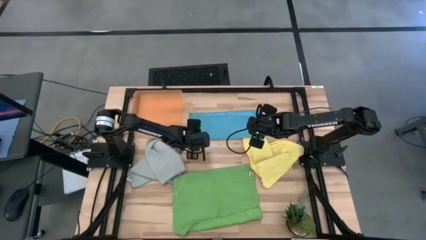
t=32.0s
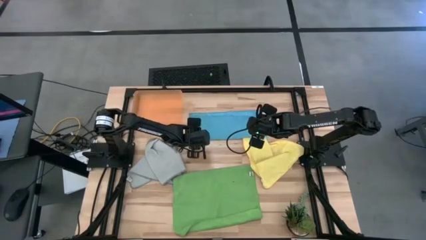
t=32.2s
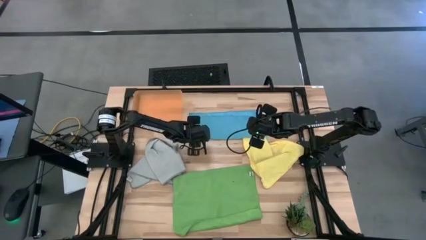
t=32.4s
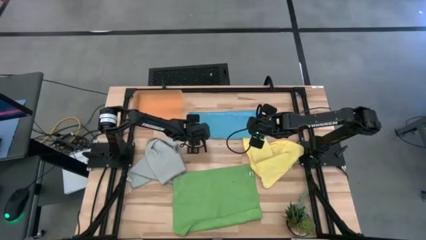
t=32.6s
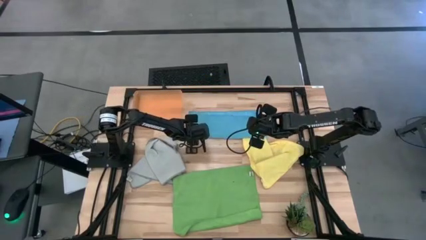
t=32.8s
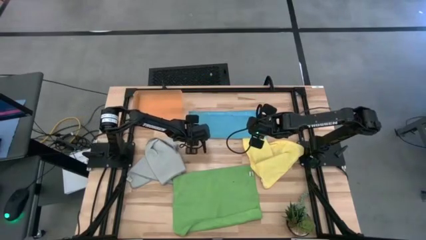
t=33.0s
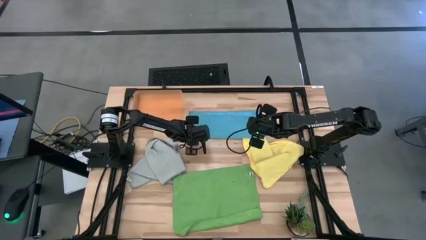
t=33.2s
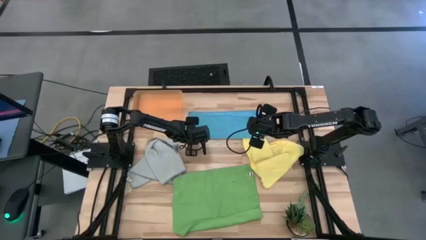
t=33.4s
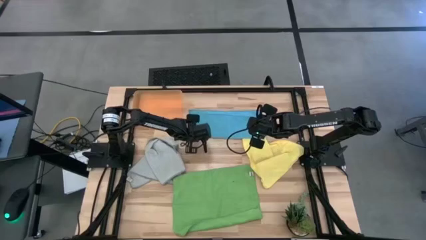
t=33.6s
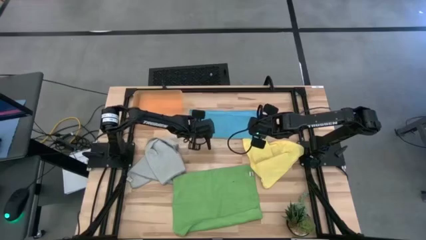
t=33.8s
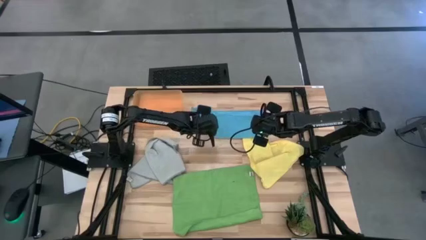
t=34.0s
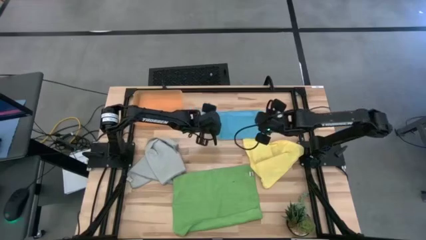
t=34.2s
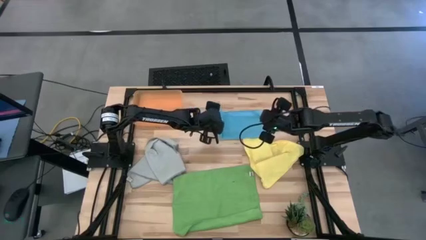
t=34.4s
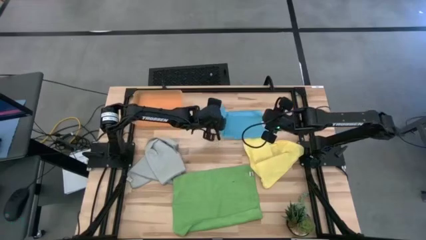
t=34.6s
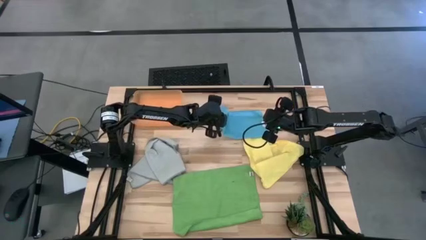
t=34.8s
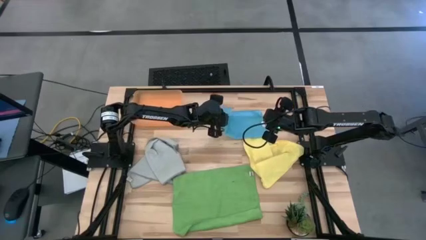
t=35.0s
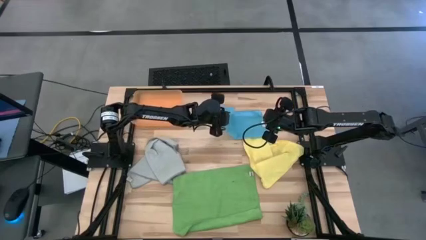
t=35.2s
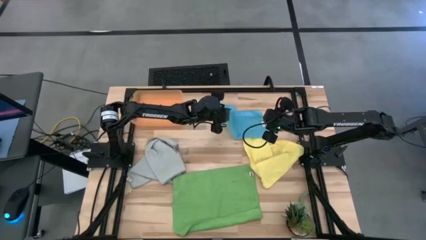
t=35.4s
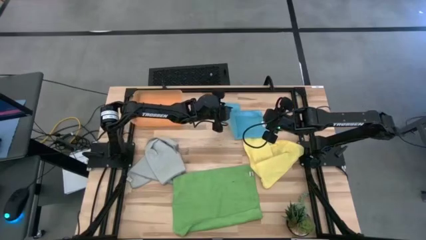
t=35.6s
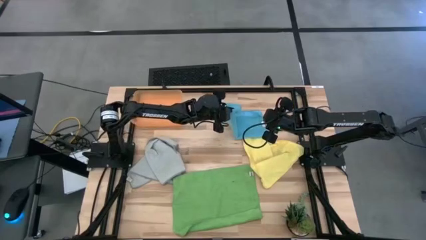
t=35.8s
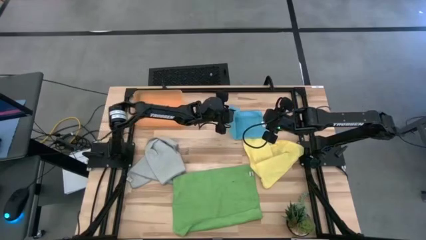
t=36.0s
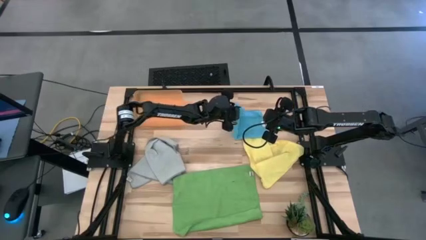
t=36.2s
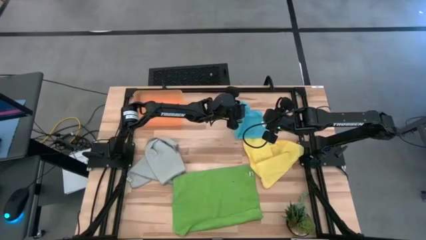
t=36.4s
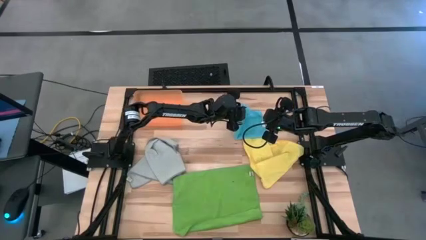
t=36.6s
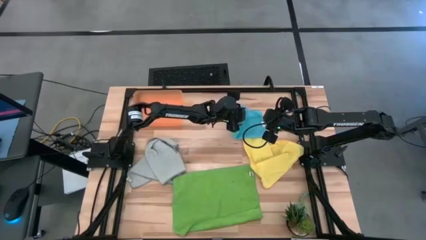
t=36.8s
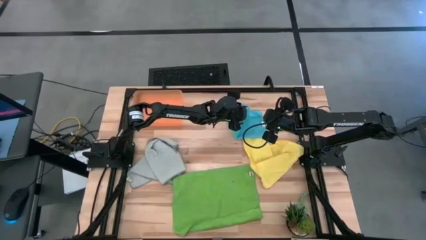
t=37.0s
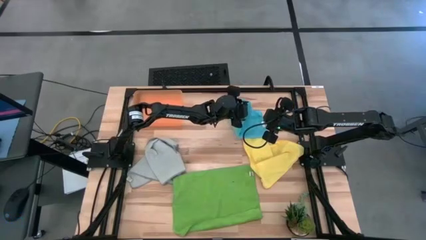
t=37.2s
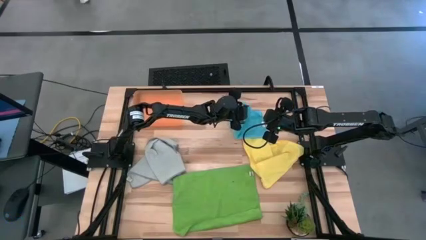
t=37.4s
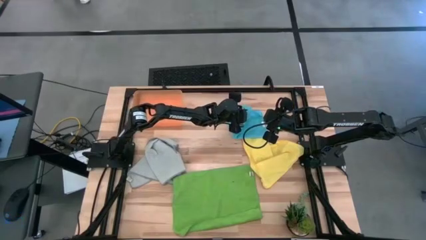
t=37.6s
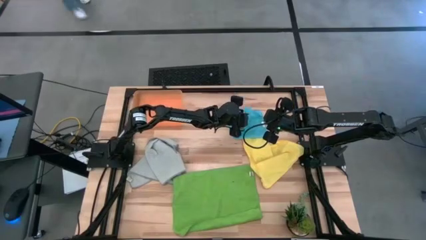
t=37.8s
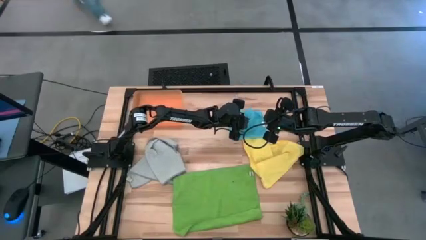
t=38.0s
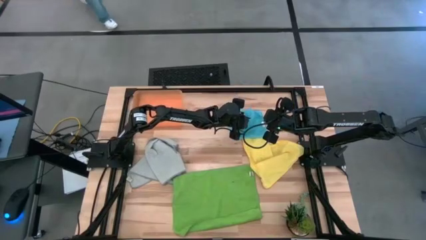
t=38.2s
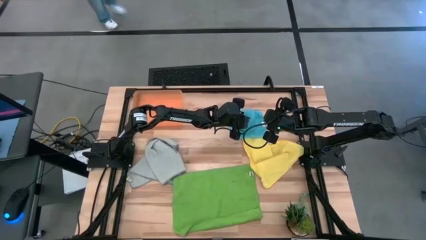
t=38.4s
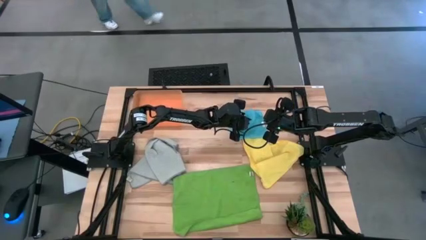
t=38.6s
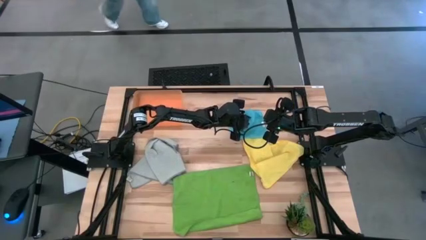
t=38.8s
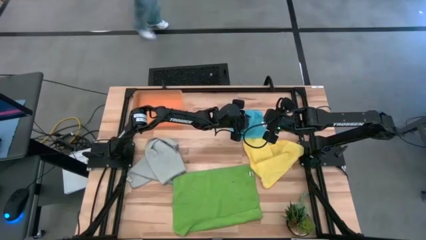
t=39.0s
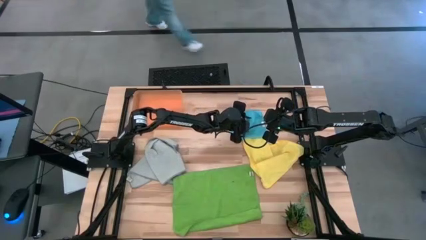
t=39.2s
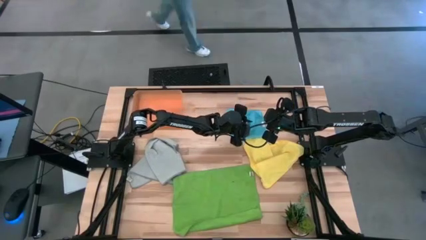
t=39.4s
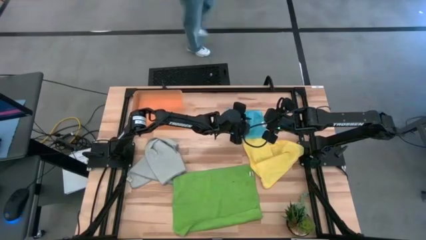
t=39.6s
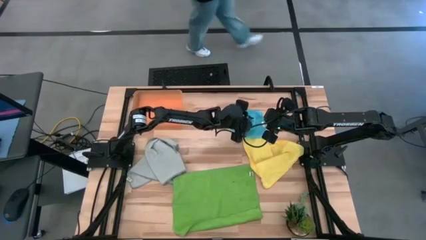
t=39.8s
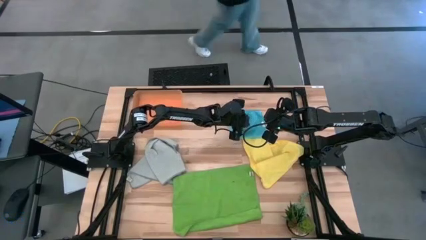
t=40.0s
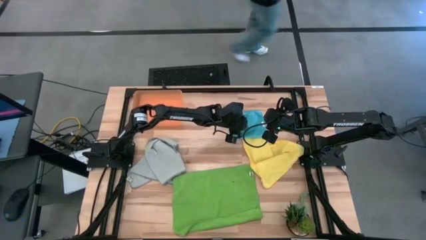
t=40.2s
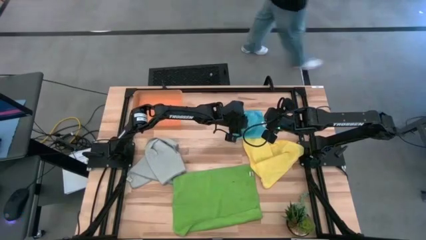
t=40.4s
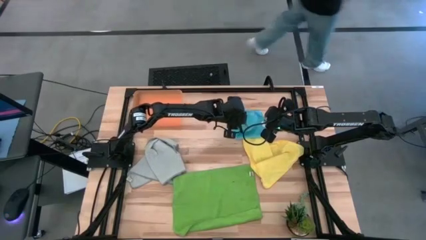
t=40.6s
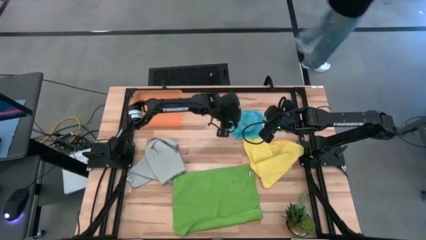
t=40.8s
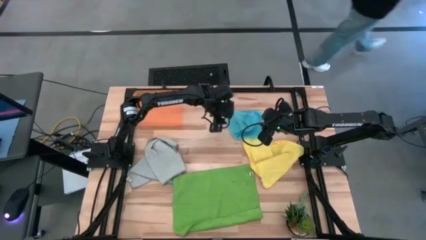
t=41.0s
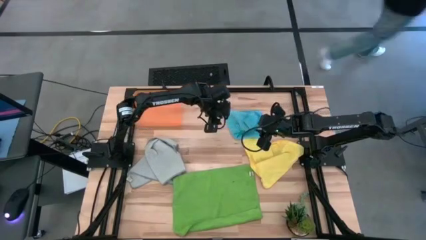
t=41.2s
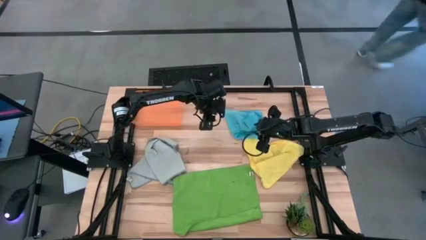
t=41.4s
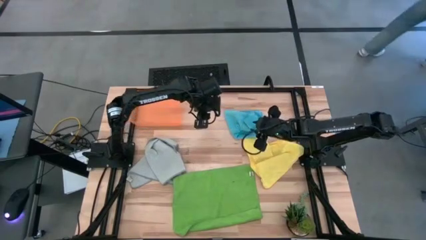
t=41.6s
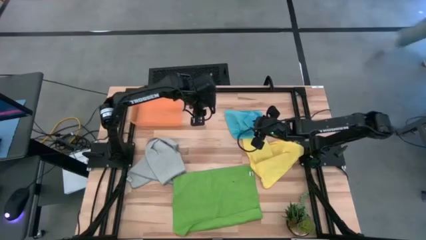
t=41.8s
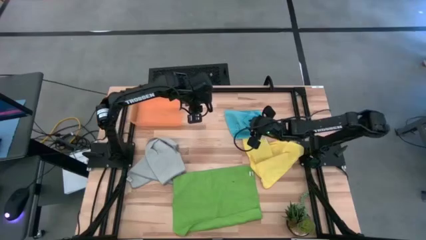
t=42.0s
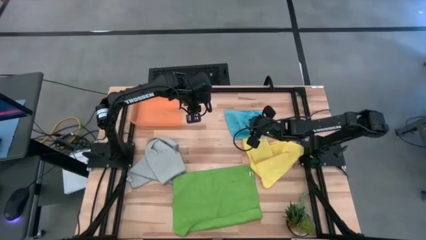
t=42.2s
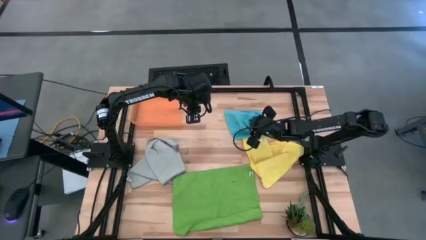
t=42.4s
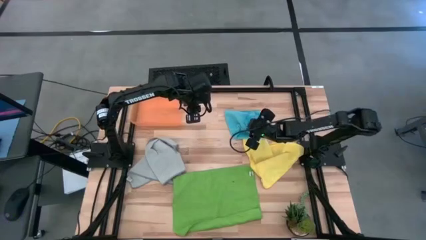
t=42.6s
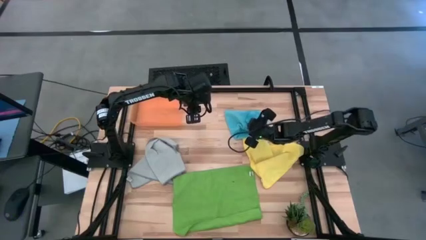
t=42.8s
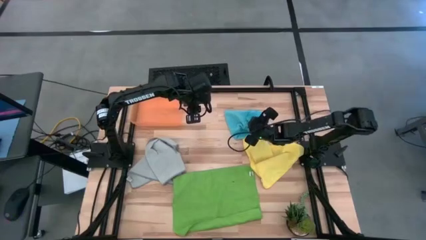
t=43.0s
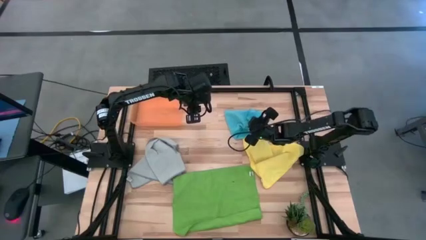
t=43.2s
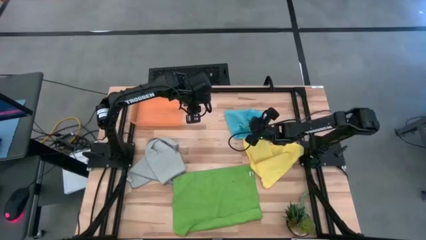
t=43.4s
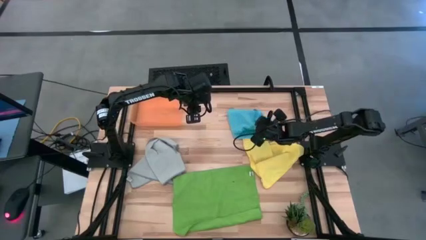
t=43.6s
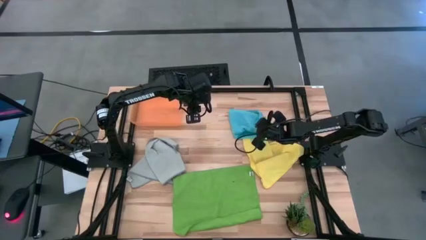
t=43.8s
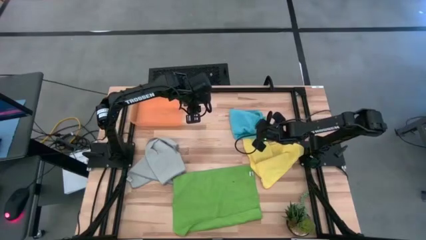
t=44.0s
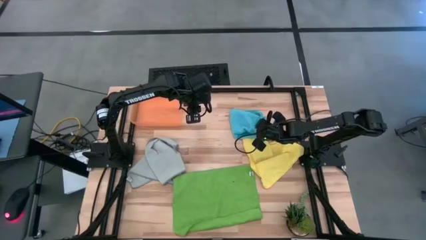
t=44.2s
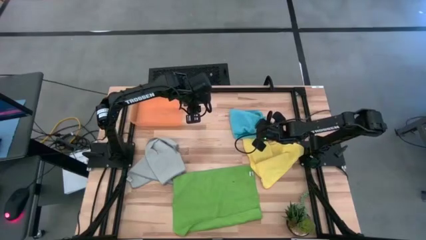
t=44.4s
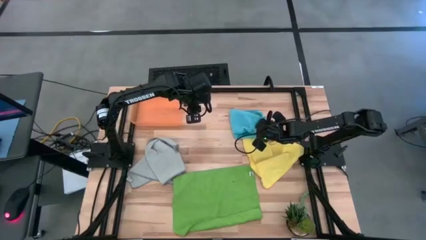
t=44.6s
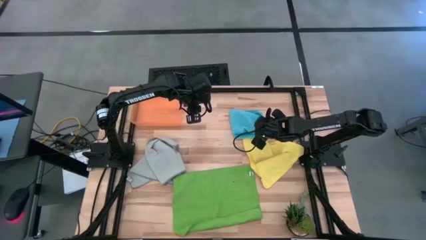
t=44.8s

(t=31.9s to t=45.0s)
Task: Fold microfiber towels
Fold the blue microfiber cloth

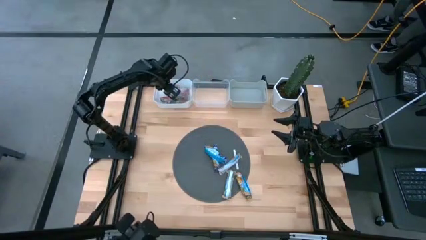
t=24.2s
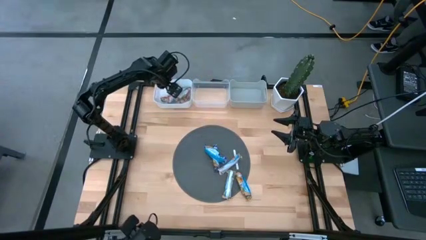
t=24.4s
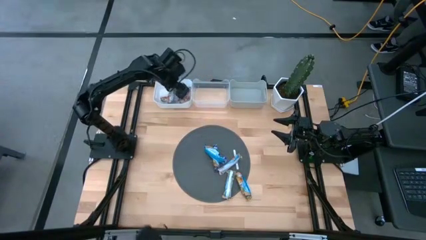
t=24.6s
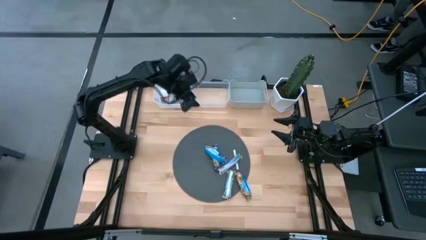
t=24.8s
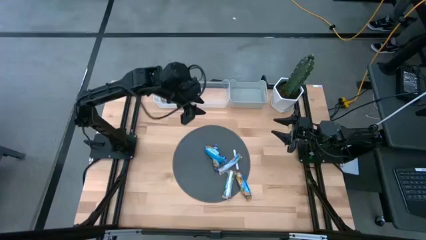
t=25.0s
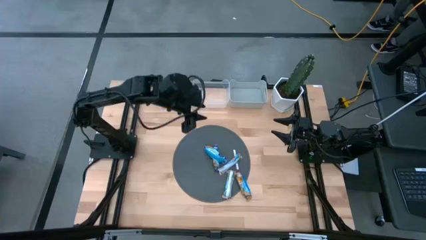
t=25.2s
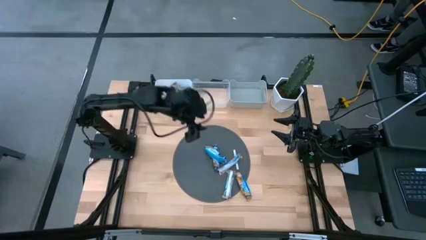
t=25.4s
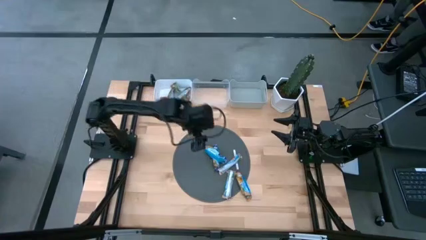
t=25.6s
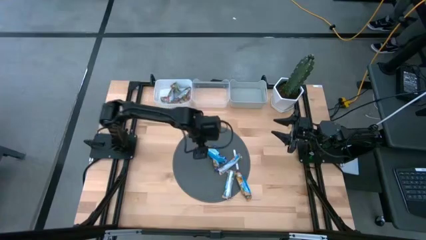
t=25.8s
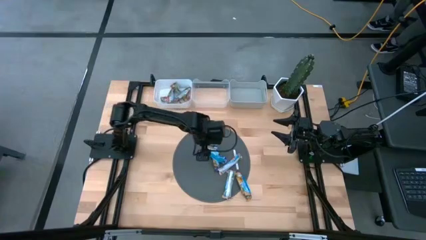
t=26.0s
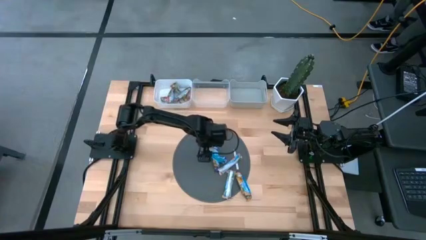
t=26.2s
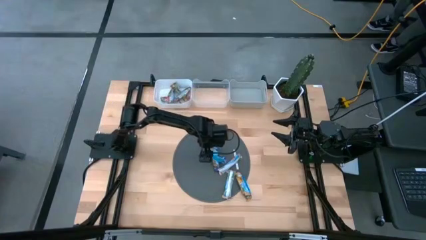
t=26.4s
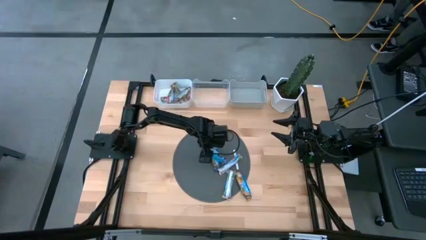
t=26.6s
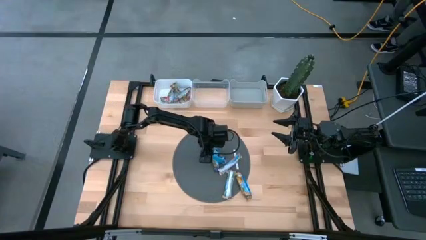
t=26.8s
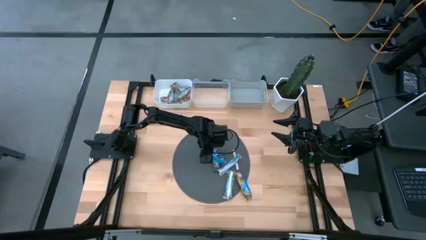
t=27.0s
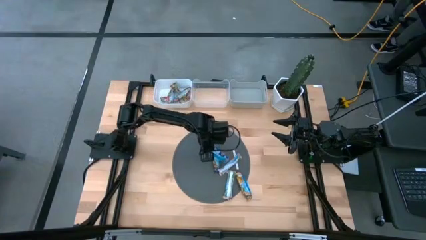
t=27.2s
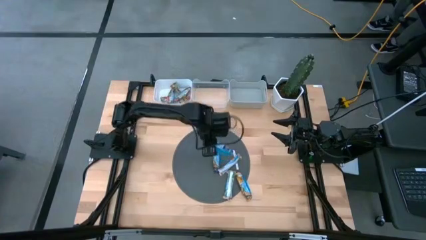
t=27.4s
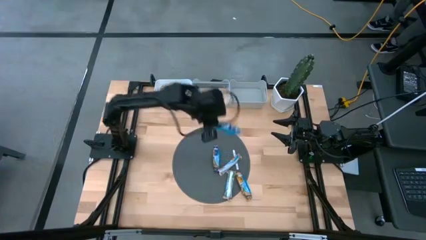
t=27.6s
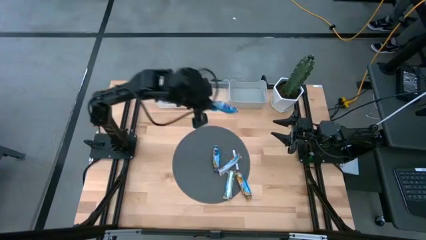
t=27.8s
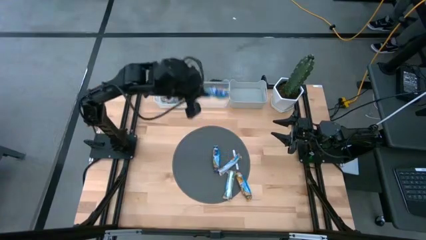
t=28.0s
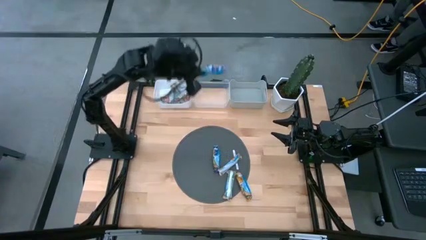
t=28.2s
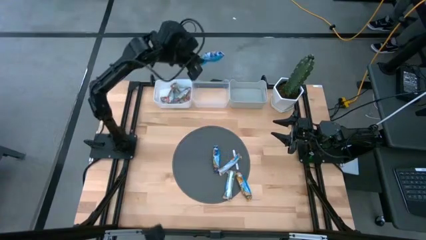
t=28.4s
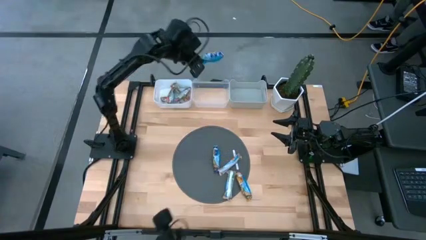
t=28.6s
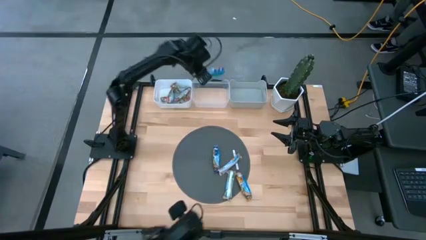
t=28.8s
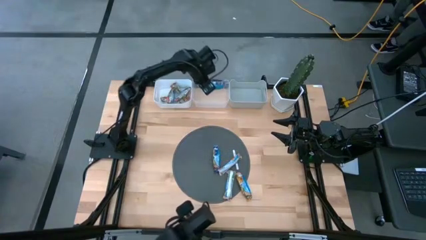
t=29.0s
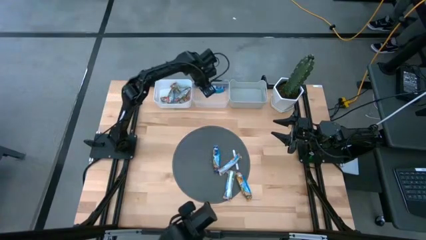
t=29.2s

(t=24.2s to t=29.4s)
Task: Pick and place Granola Bars by type
Put the blue granola bar into the transparent bin
